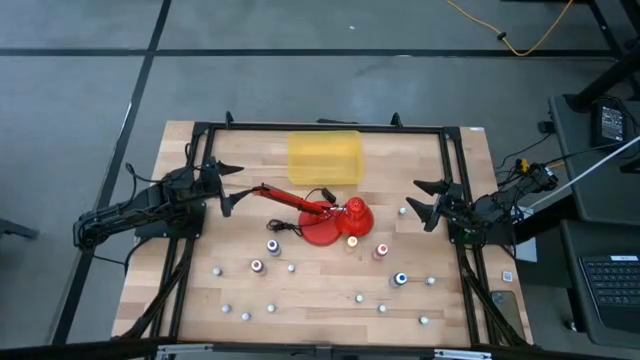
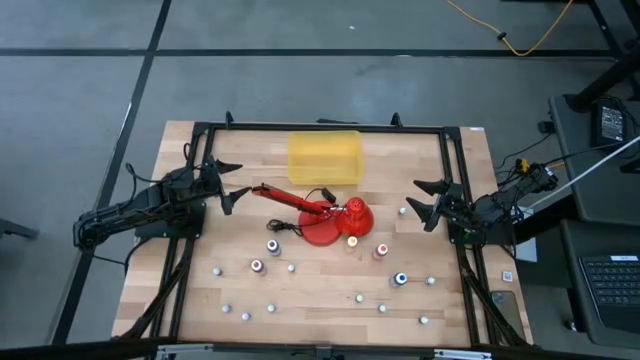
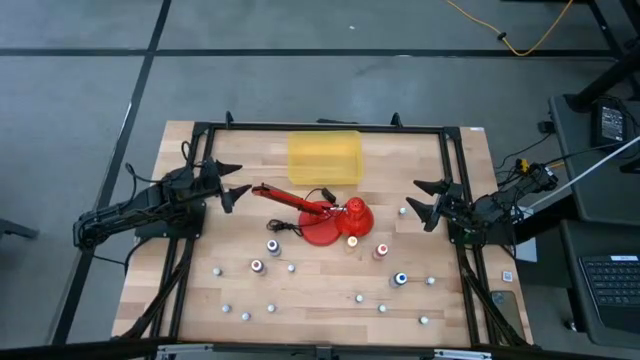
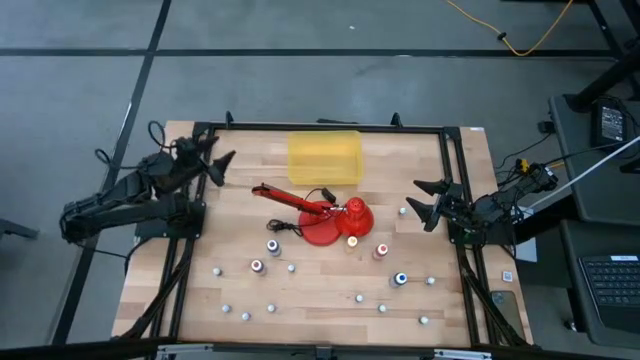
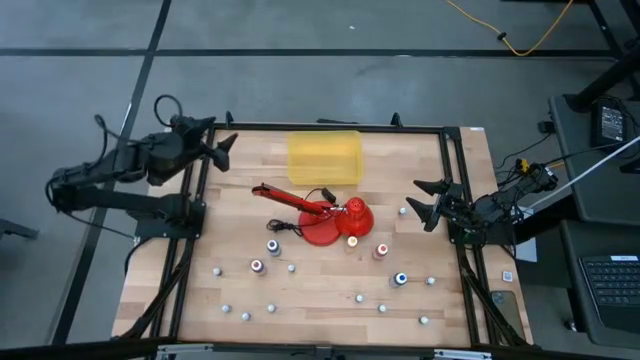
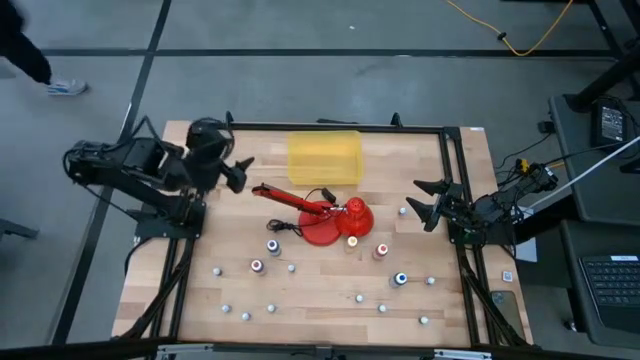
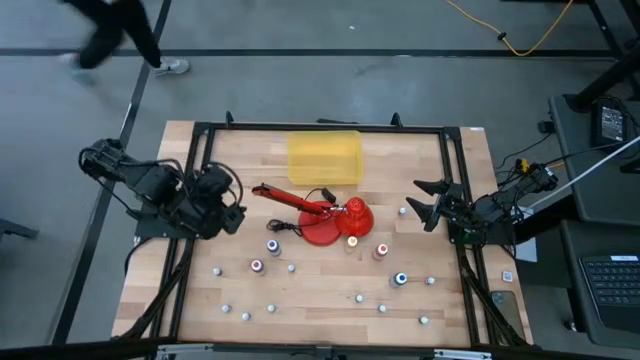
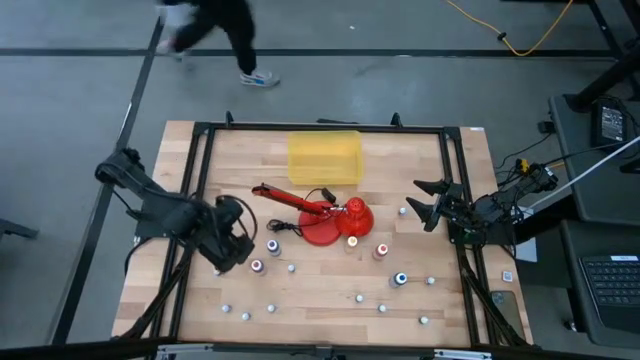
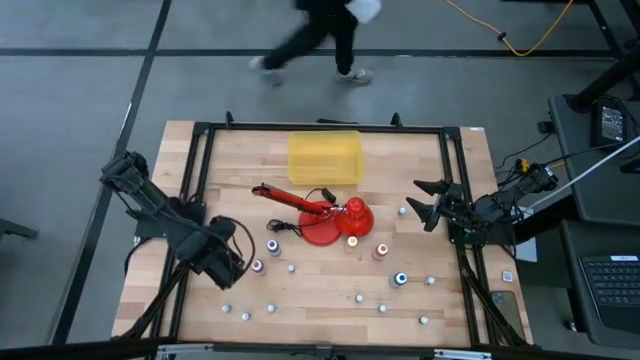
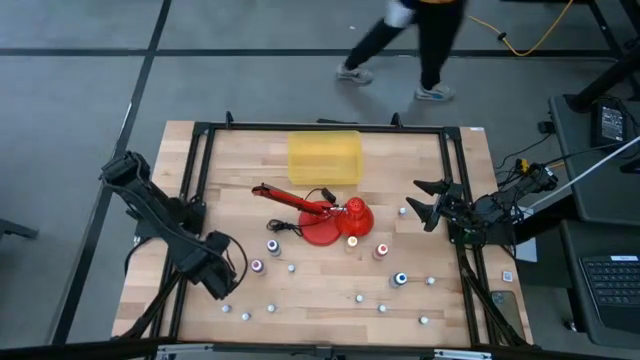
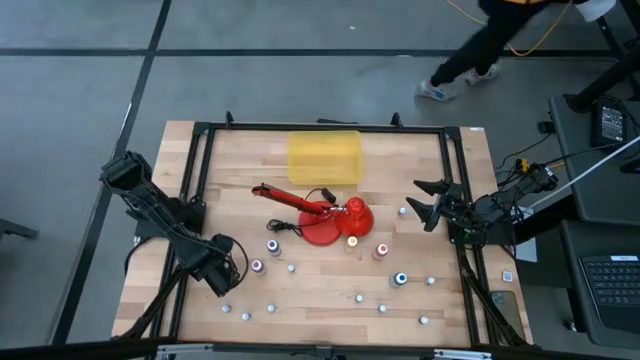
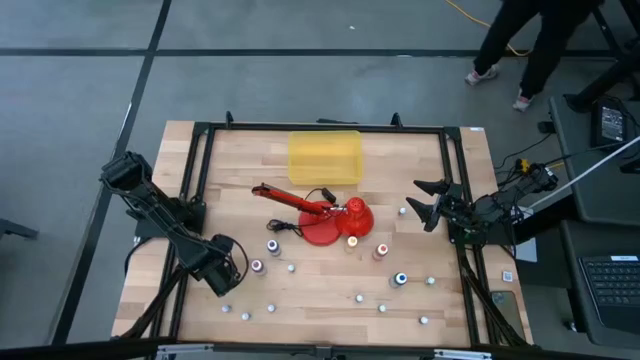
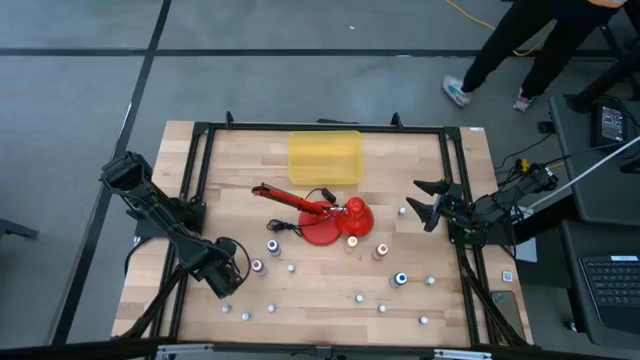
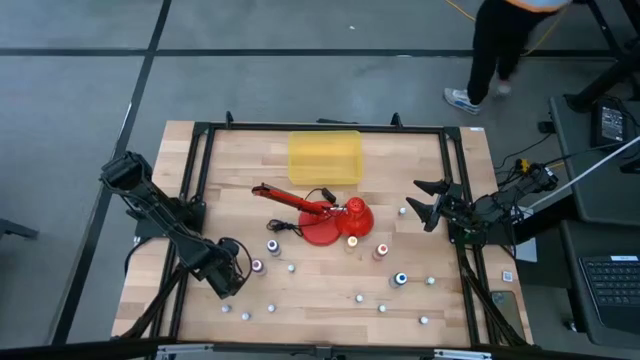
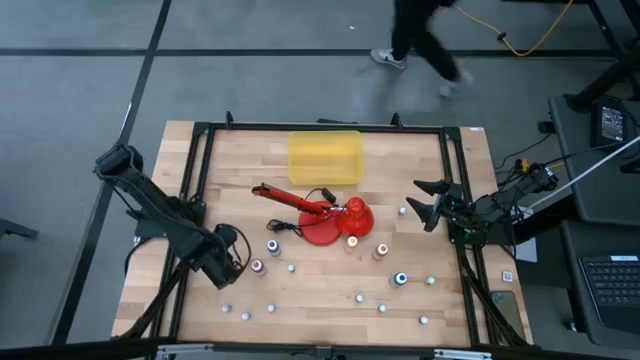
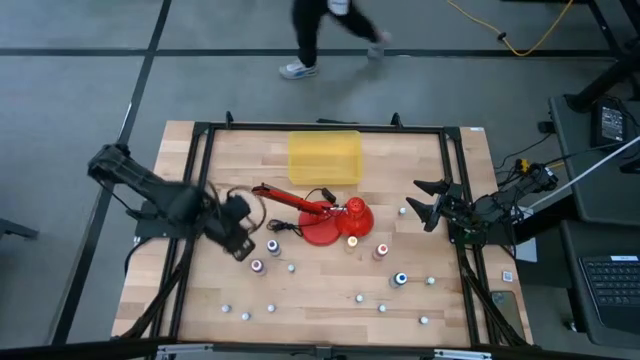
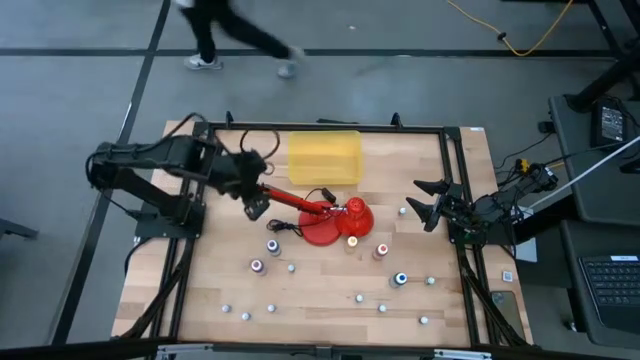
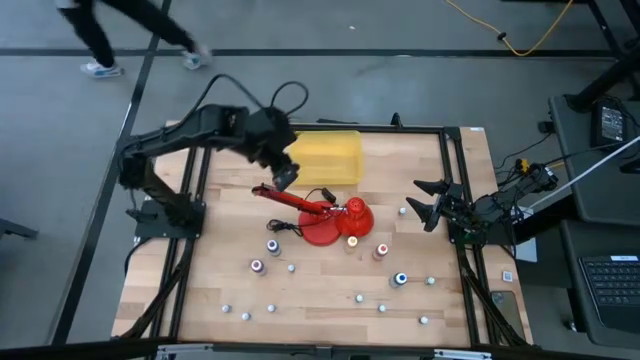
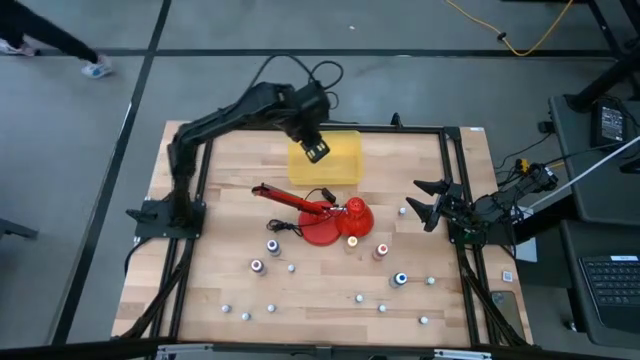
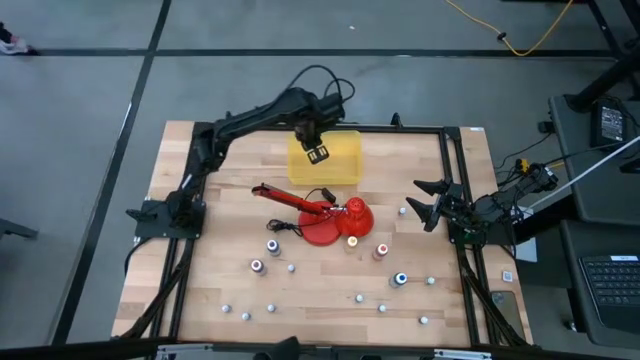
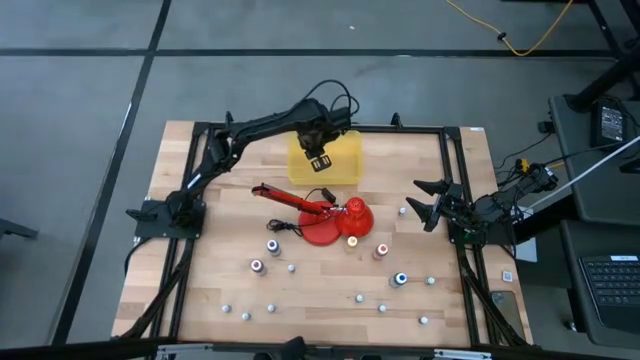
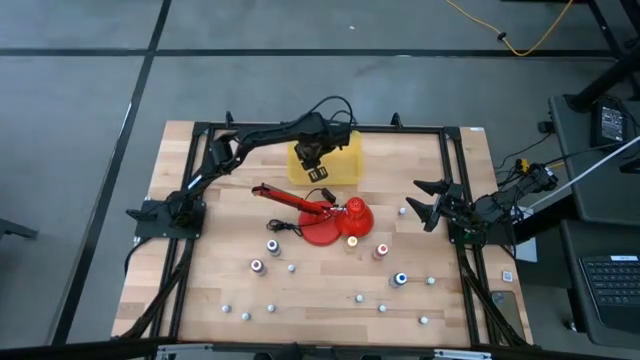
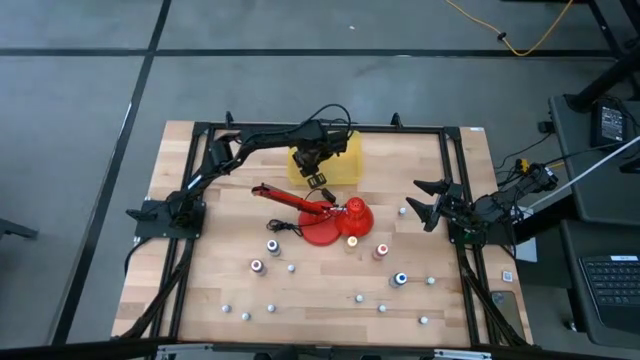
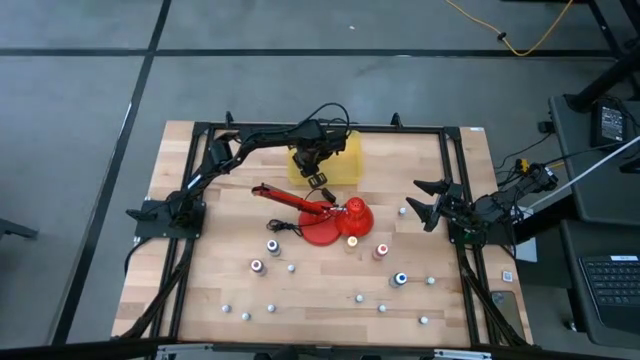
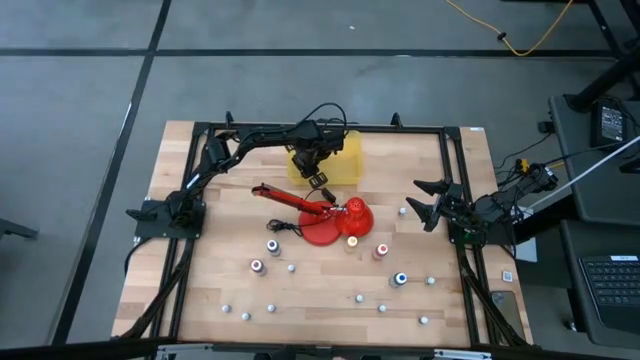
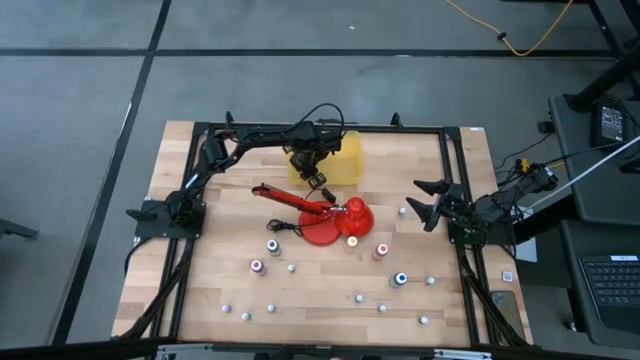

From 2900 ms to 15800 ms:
Task: Pick & Place food coloring
Put the black food coloring bottle into the yellow bin

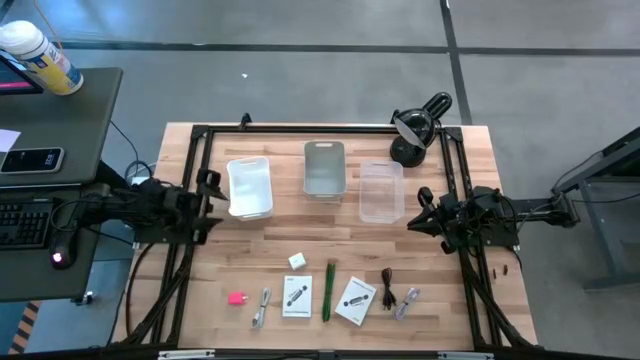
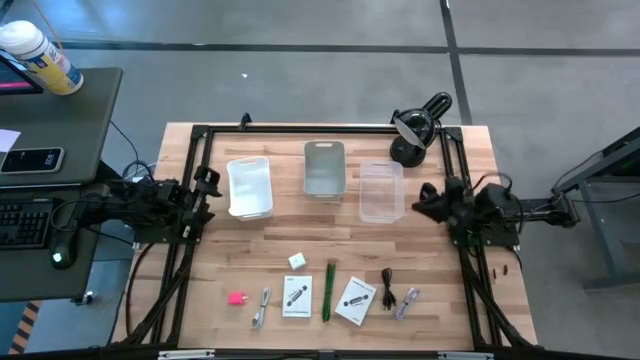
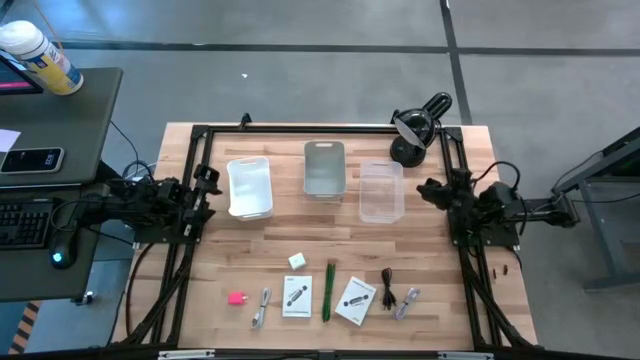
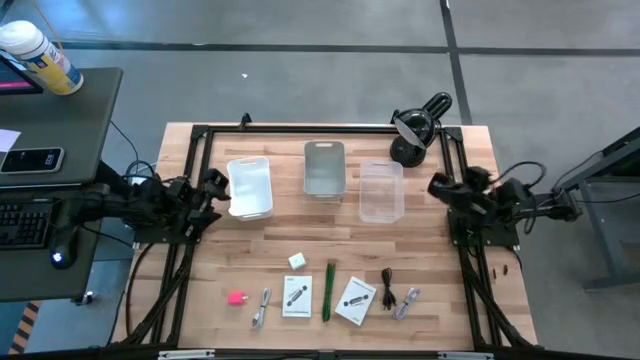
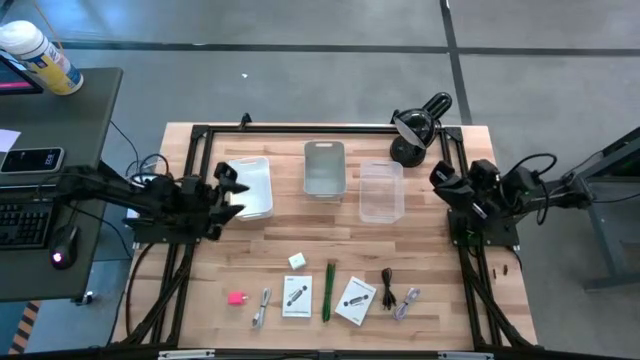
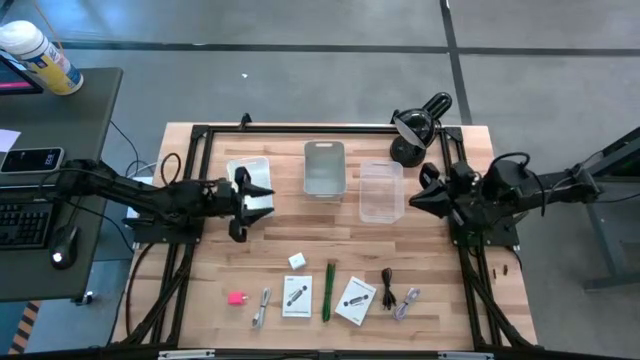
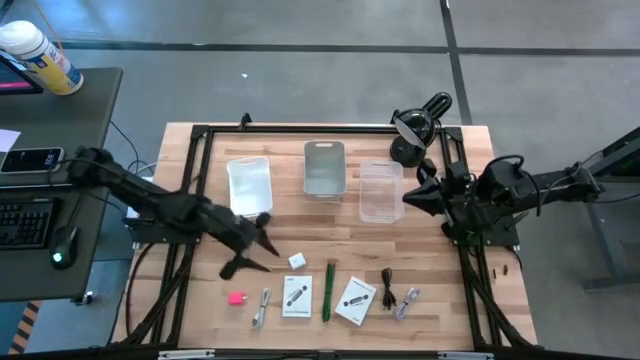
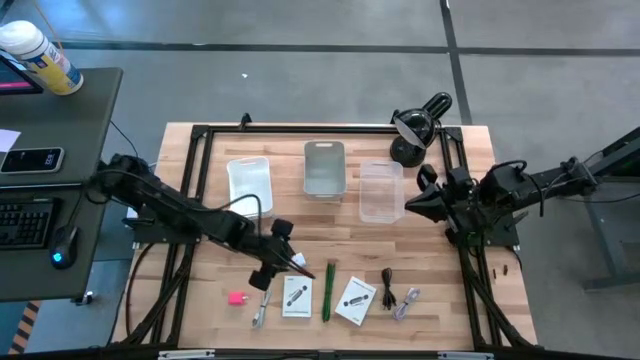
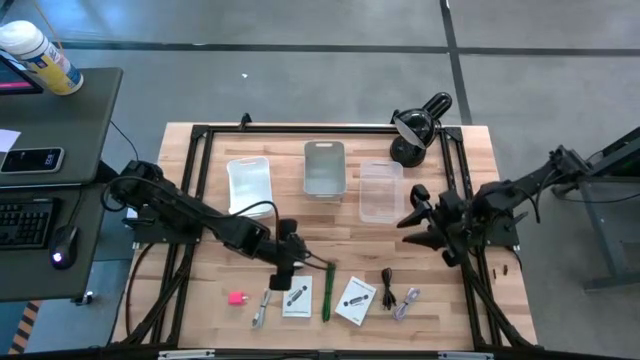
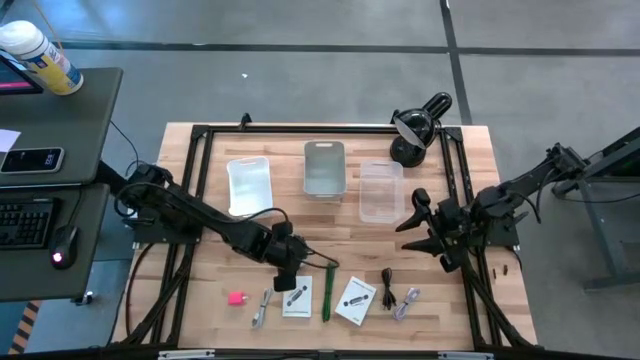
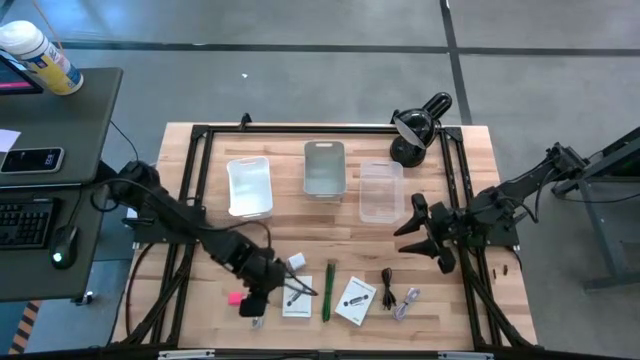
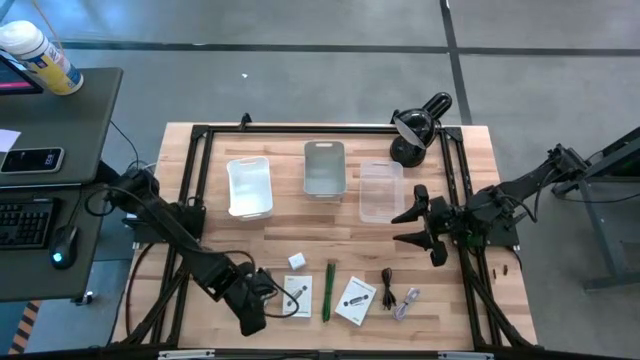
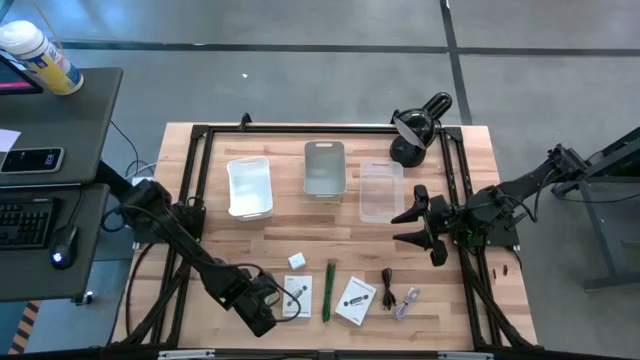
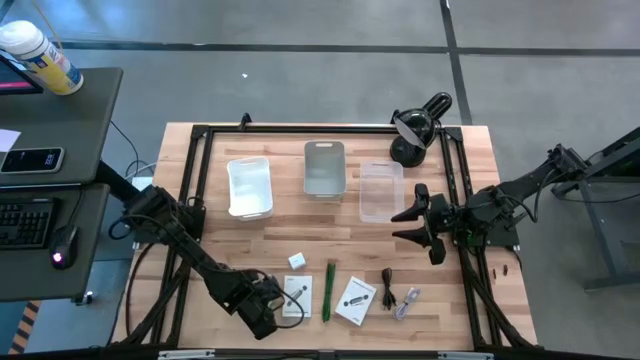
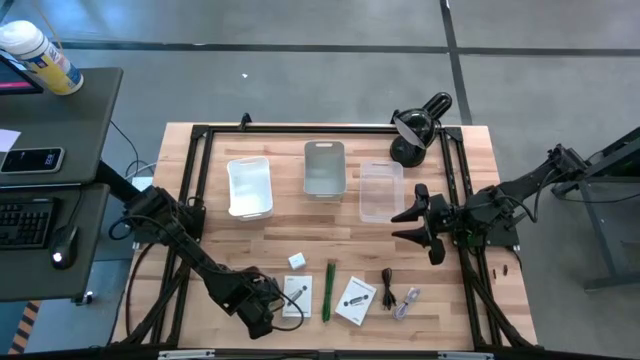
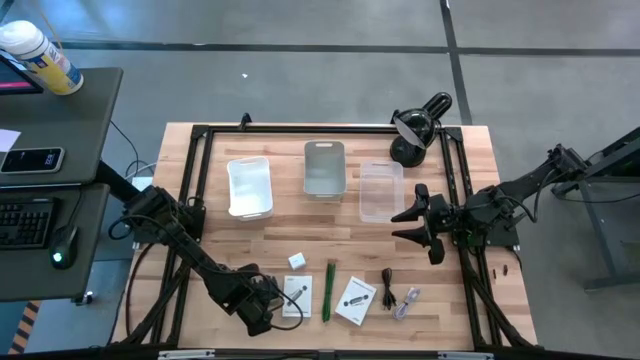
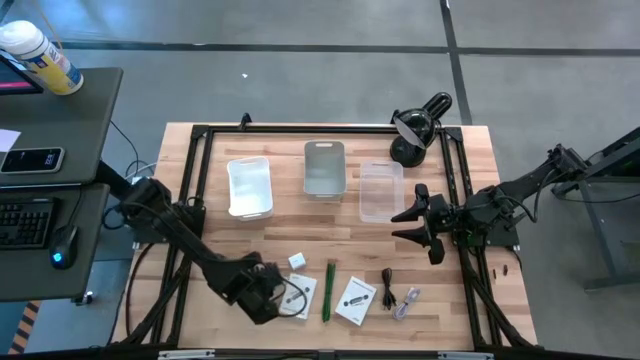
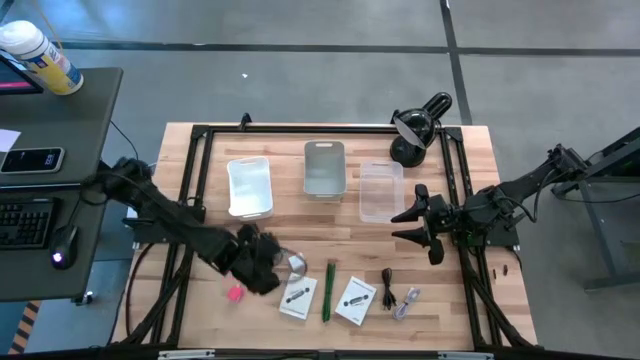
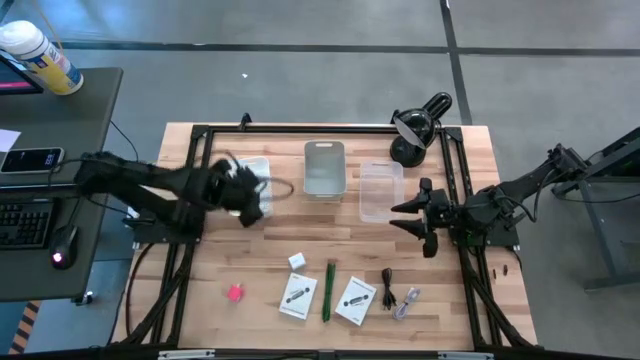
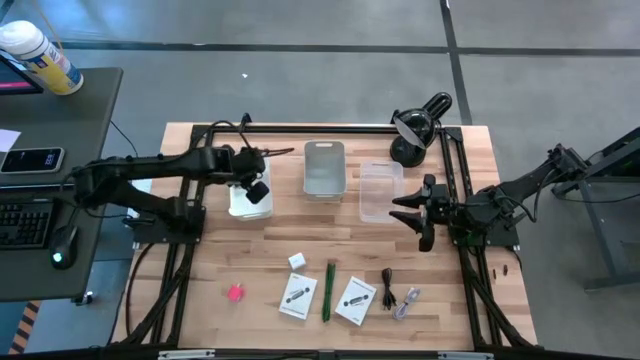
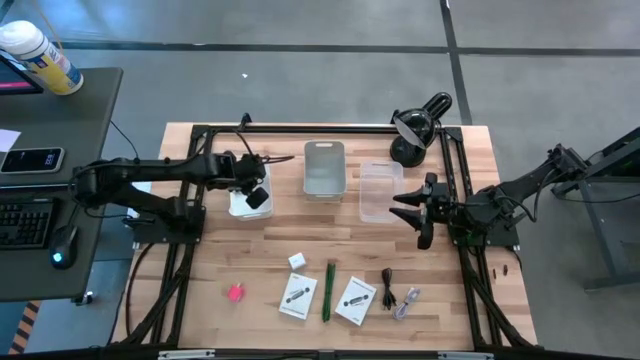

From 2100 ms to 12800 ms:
Task: Pick and place items into bin
Put the white USB cable into the white bin
